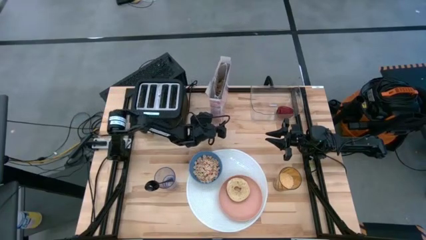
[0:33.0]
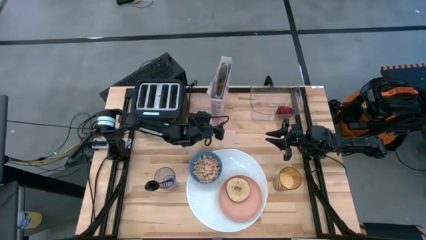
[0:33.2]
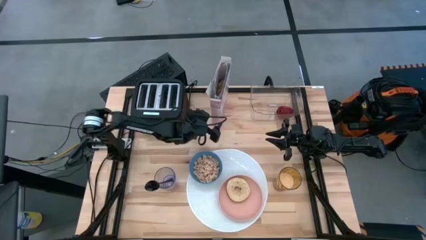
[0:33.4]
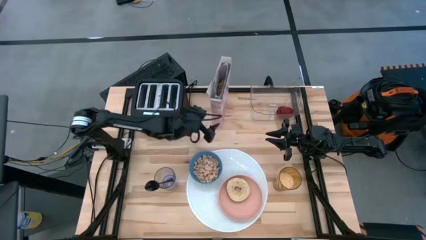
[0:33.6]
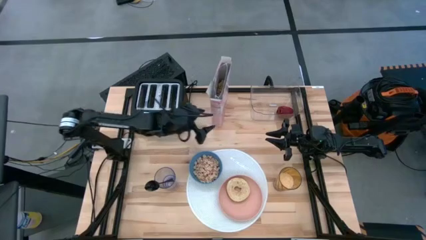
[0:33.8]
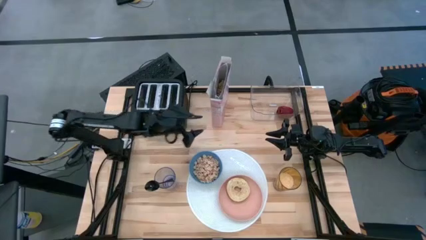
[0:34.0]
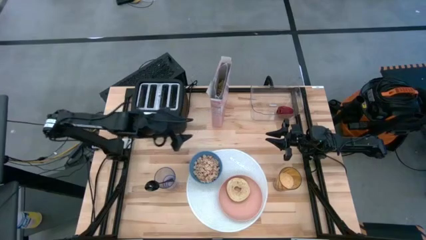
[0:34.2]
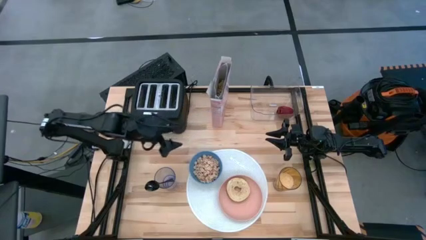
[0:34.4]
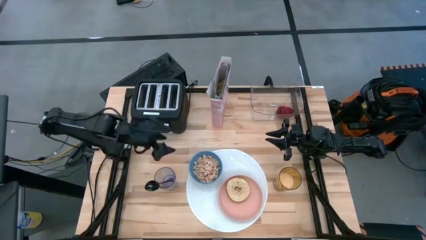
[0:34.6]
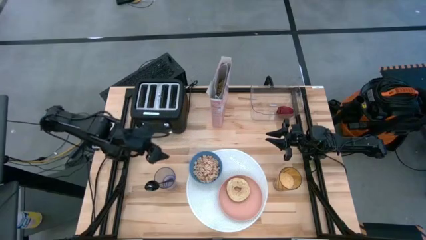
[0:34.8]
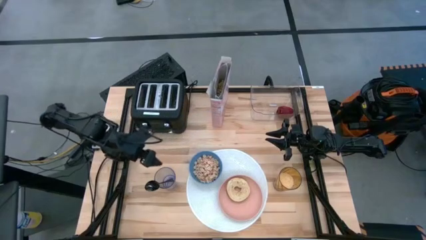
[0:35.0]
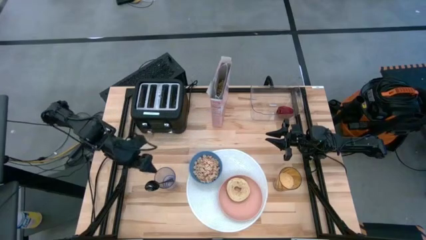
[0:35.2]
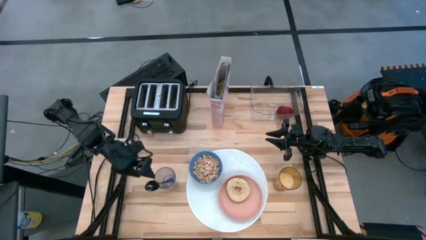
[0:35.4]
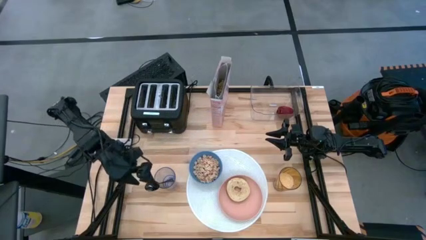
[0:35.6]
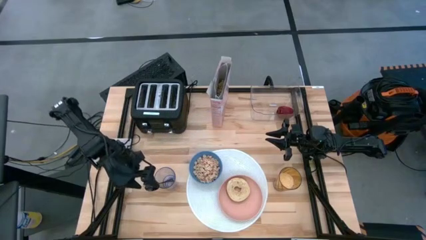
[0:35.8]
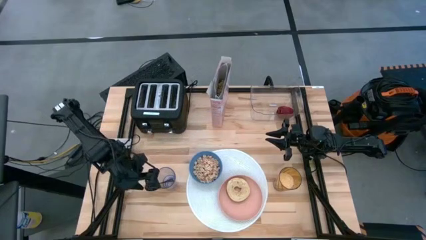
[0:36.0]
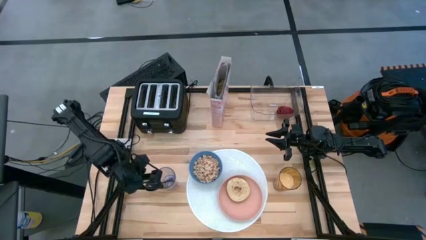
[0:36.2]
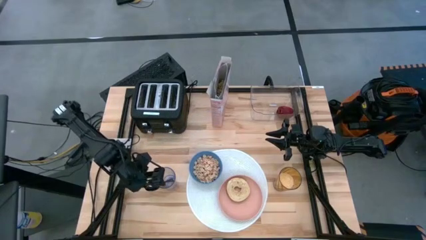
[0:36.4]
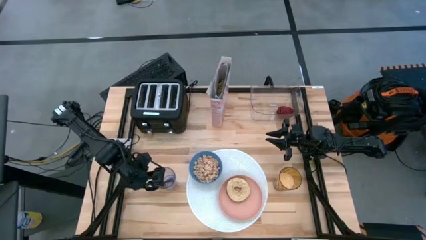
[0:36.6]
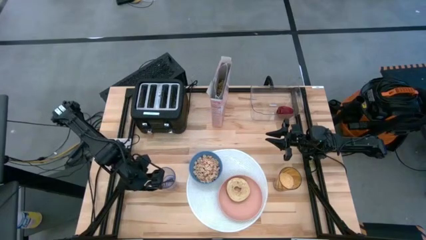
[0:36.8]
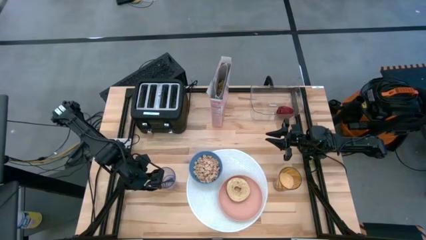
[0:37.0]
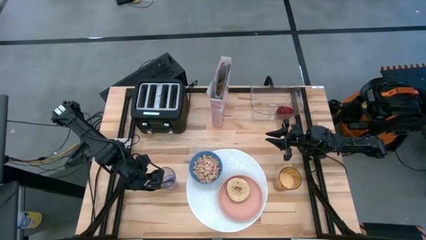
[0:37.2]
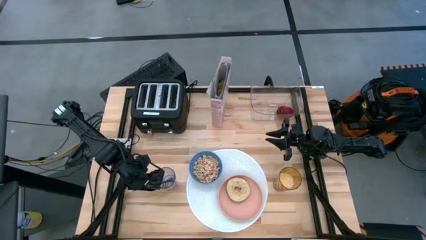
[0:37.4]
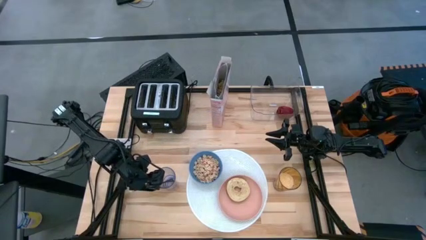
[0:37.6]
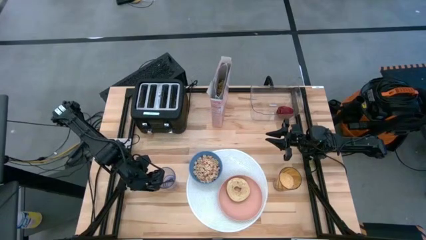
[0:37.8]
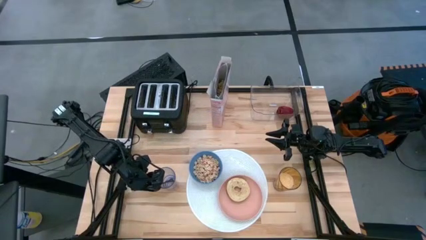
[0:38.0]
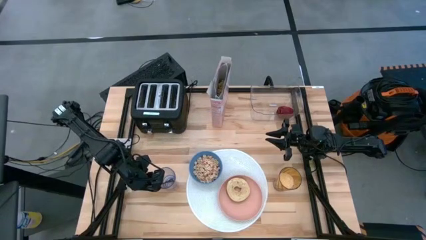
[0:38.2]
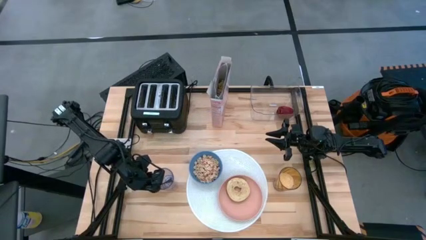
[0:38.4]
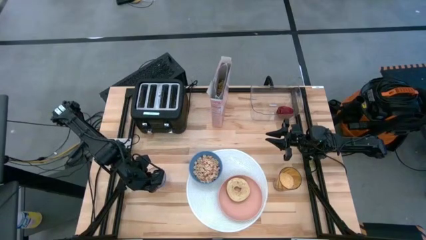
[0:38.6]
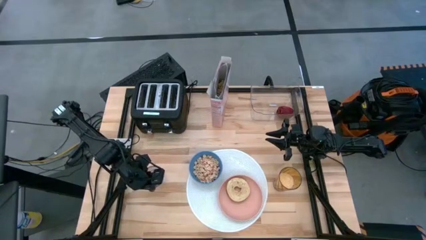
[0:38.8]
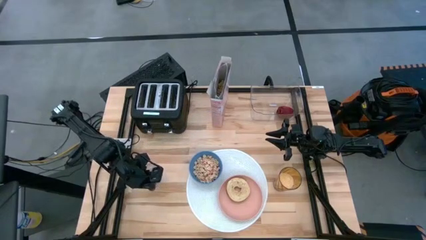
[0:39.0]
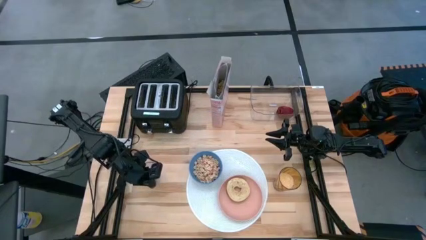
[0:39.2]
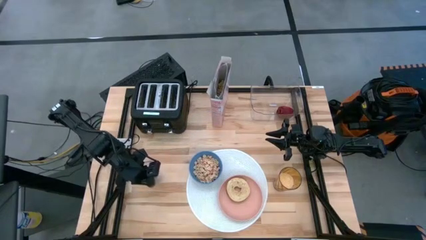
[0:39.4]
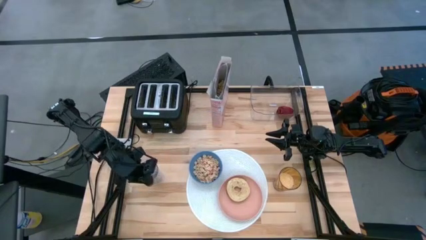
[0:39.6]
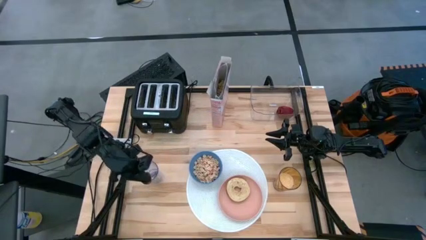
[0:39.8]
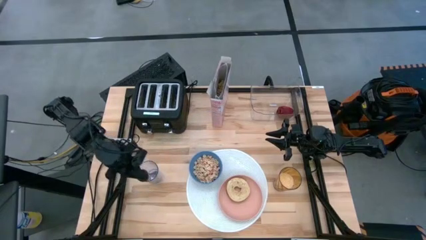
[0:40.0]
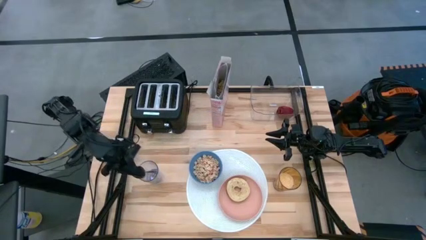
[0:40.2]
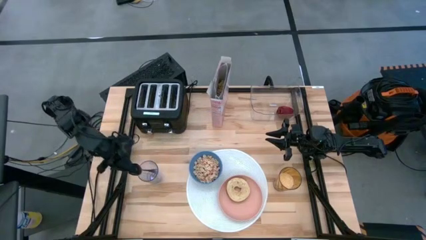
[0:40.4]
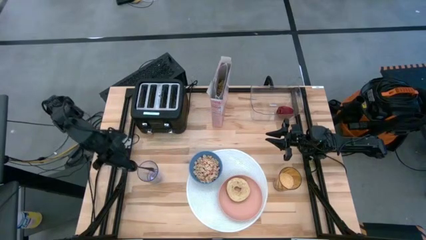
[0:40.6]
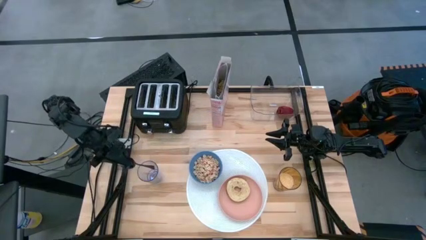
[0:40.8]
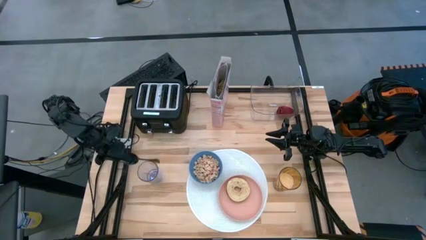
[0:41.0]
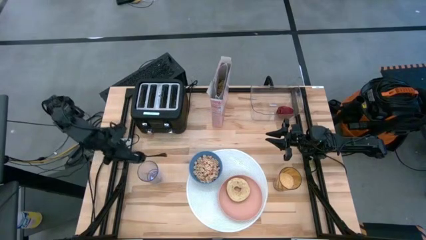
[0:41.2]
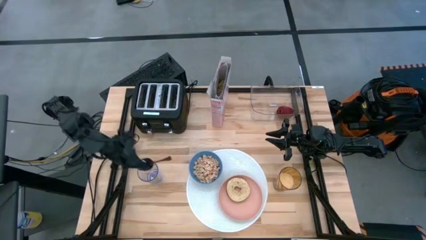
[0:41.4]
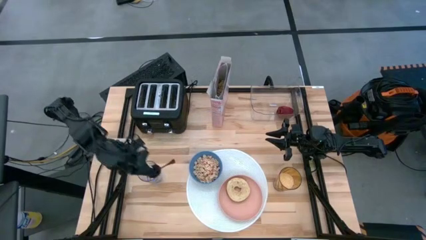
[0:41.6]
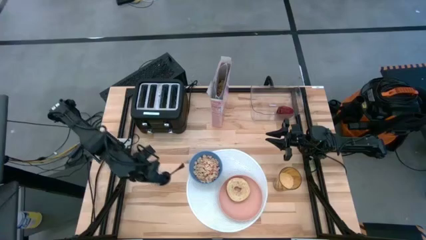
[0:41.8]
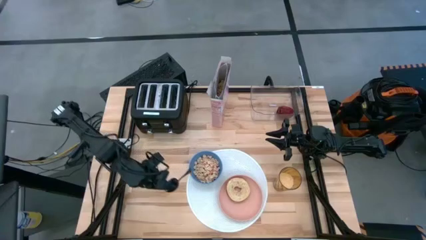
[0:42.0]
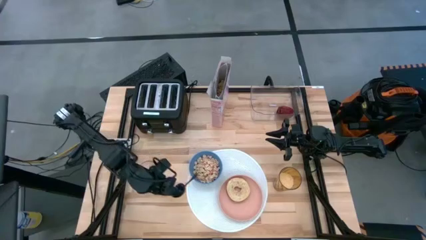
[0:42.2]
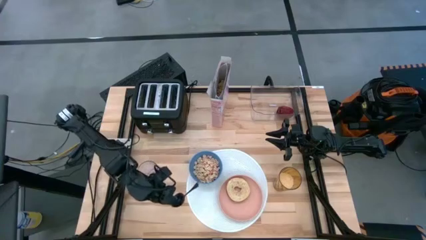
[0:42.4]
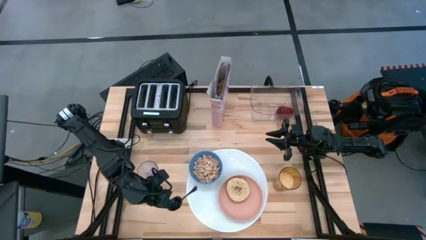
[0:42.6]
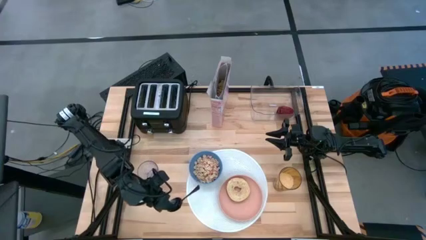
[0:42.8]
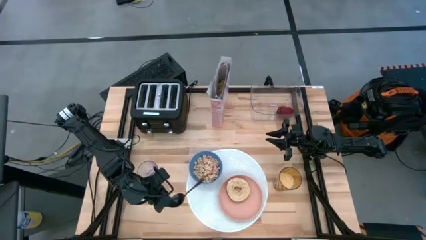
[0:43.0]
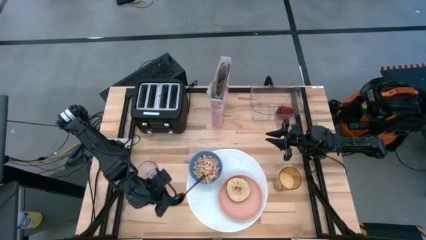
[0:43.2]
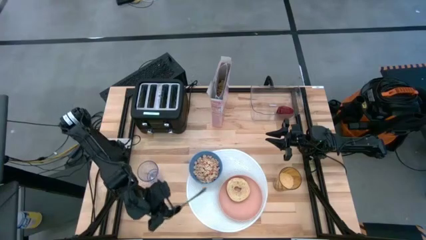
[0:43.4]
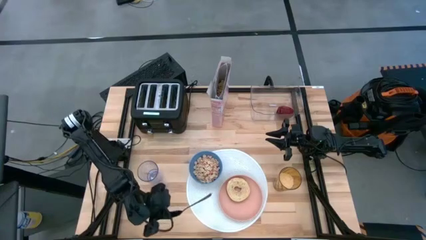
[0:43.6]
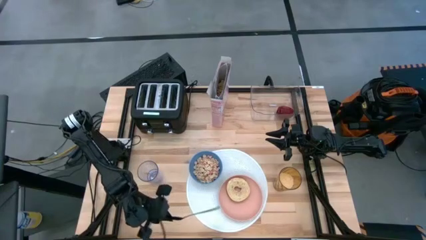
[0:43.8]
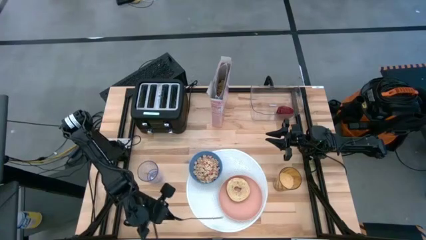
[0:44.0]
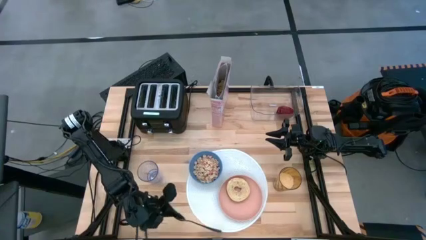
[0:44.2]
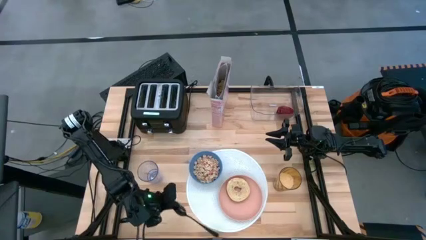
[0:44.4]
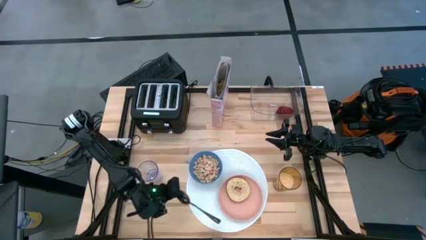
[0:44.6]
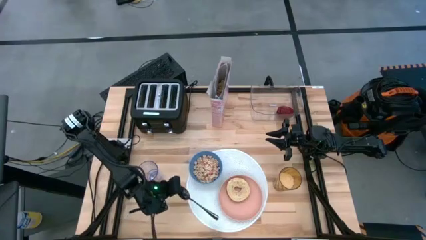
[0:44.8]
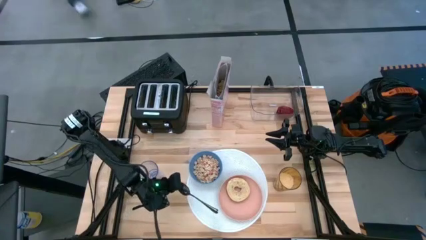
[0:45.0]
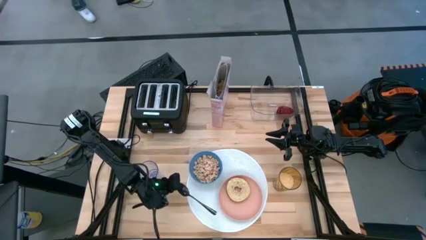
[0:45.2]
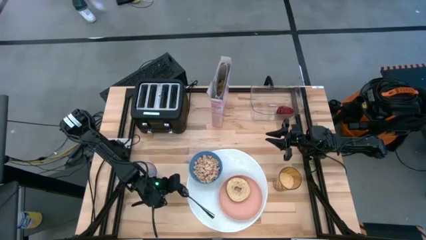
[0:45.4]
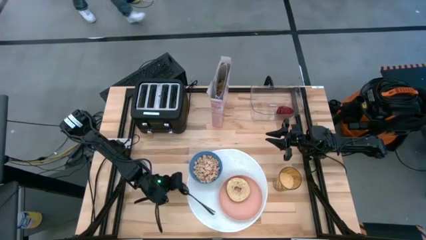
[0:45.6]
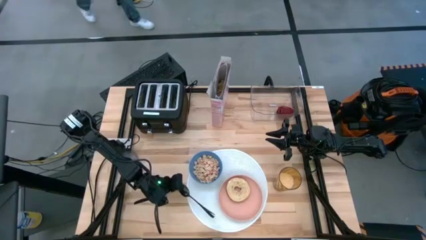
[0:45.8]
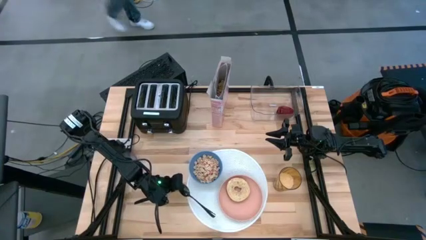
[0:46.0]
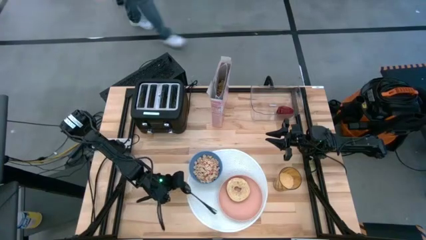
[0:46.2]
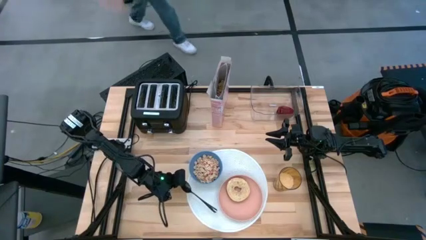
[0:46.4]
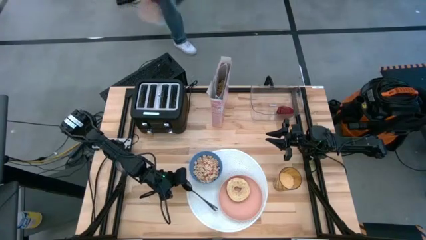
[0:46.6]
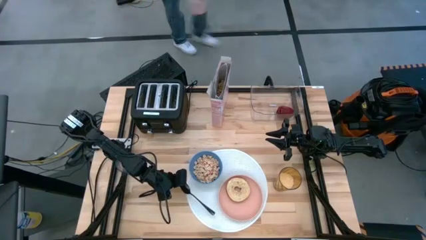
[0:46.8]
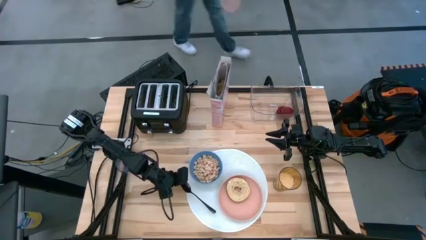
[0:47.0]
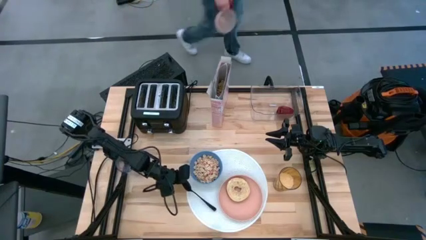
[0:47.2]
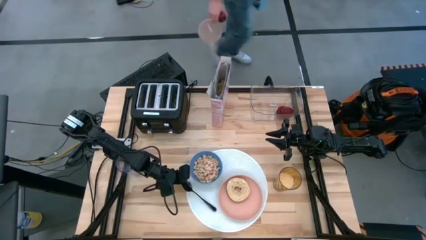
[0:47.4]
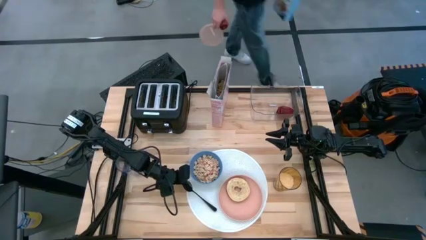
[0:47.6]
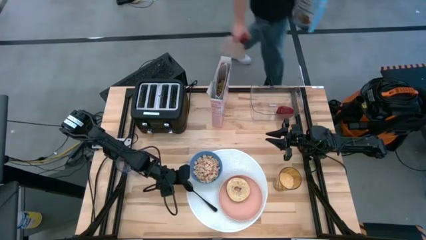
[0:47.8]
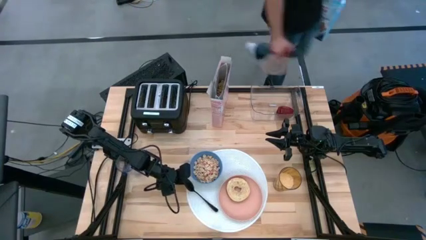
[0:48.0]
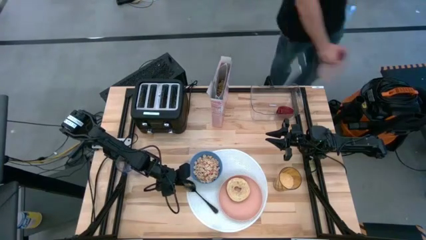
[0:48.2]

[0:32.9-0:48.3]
Task: Arrange a breakfast setting
Put the black spoon on the bottom left of the white placemat
